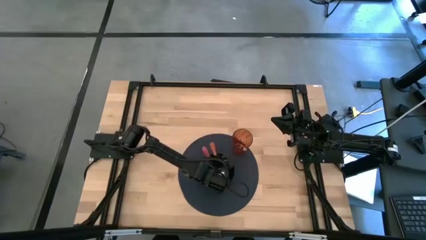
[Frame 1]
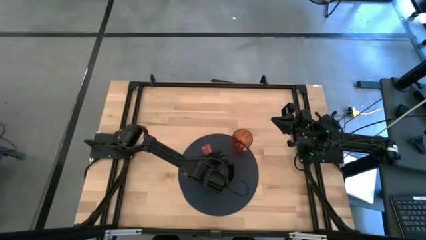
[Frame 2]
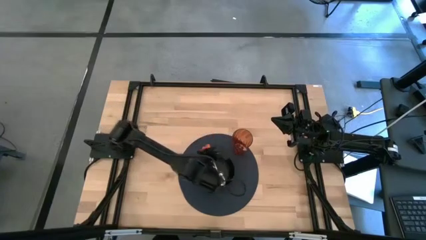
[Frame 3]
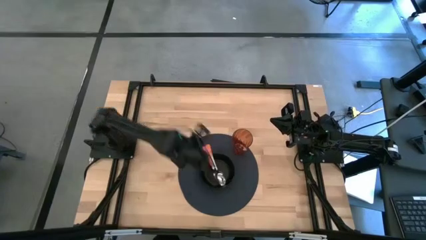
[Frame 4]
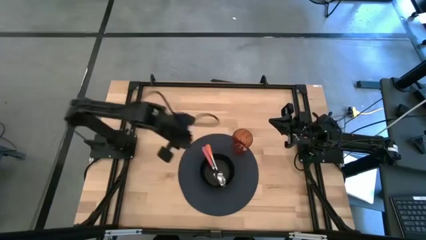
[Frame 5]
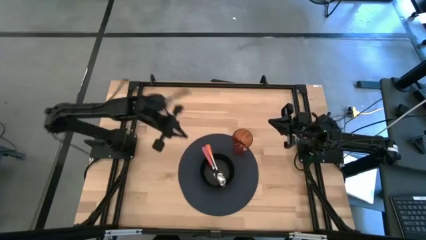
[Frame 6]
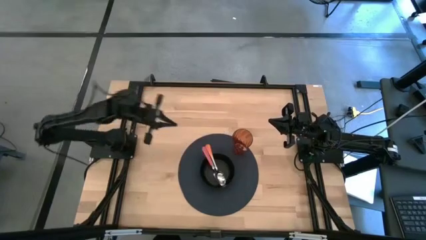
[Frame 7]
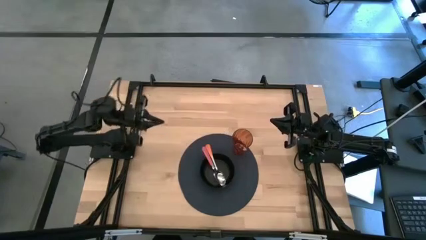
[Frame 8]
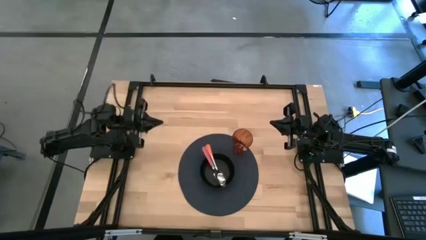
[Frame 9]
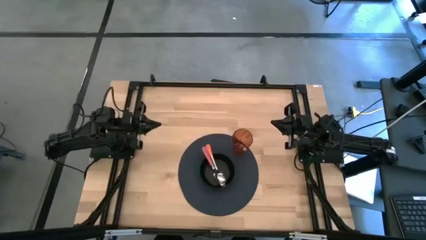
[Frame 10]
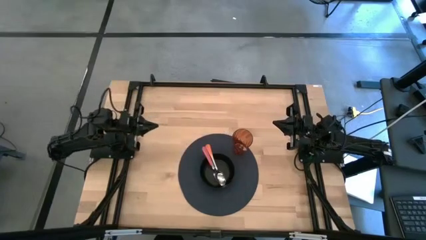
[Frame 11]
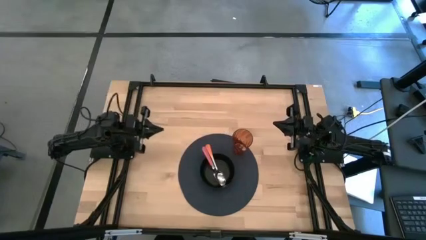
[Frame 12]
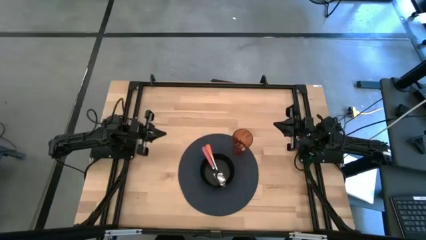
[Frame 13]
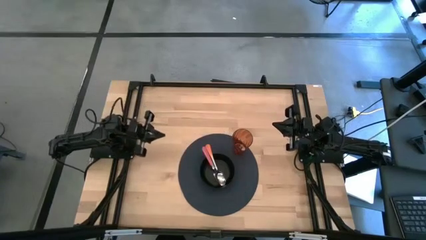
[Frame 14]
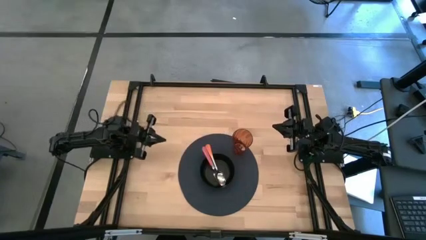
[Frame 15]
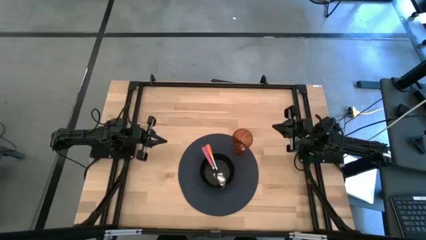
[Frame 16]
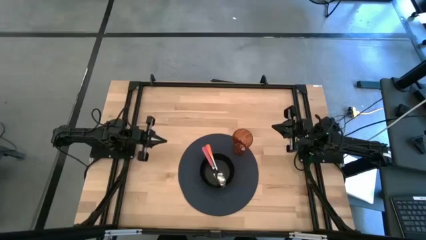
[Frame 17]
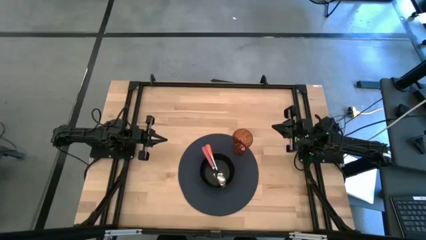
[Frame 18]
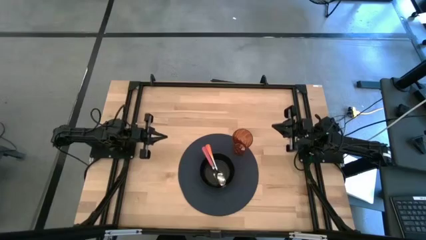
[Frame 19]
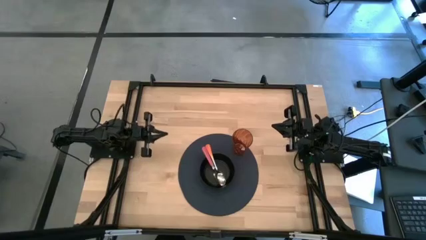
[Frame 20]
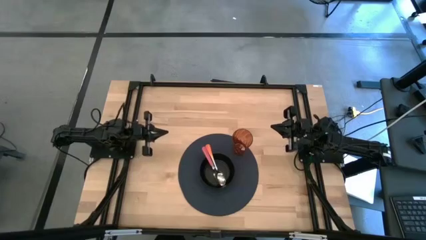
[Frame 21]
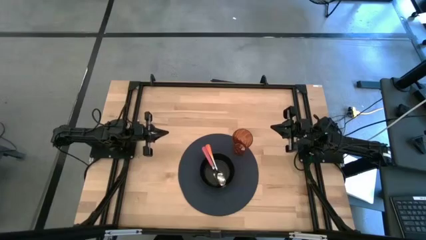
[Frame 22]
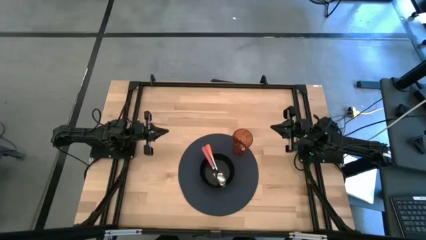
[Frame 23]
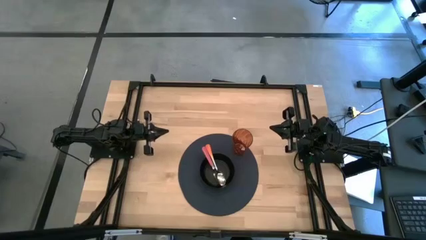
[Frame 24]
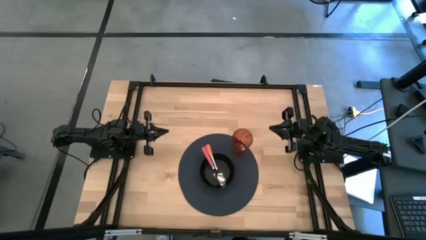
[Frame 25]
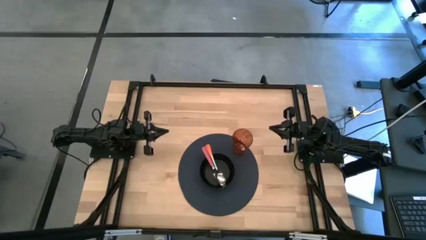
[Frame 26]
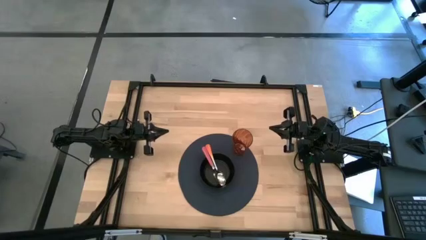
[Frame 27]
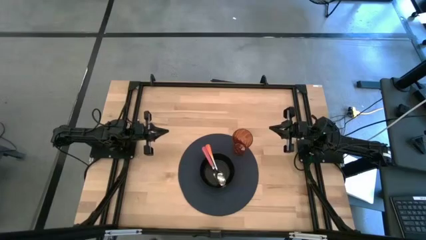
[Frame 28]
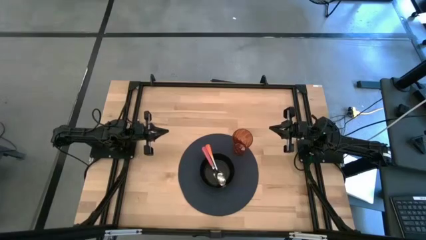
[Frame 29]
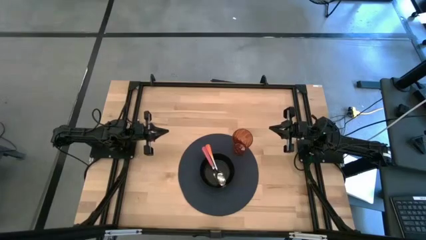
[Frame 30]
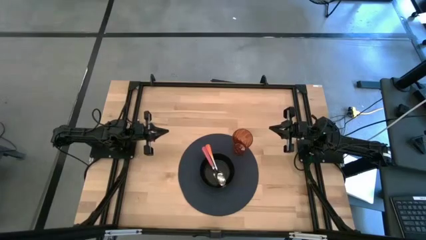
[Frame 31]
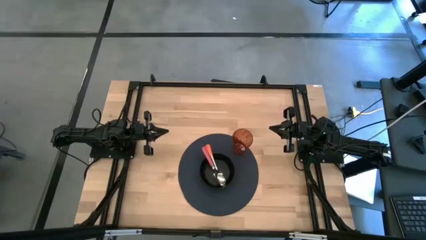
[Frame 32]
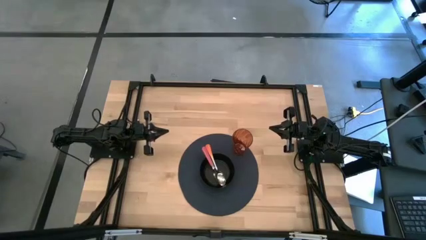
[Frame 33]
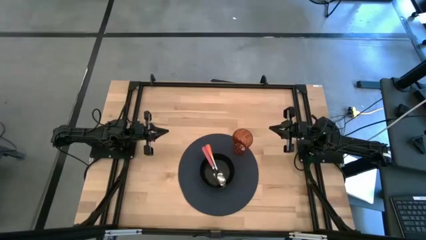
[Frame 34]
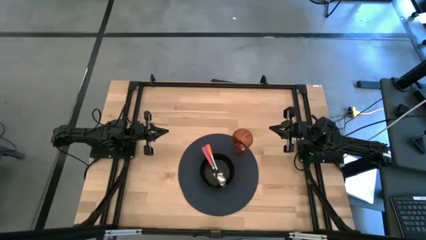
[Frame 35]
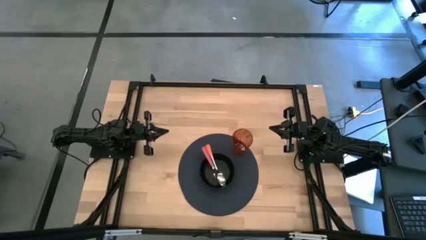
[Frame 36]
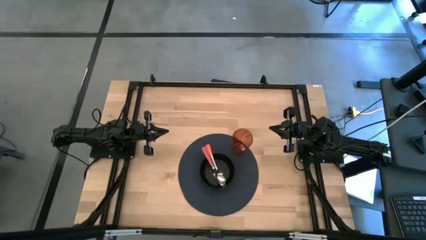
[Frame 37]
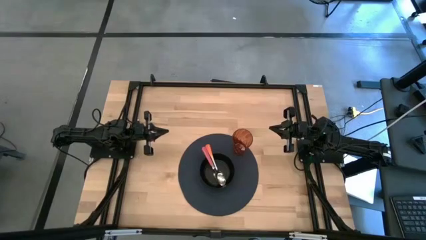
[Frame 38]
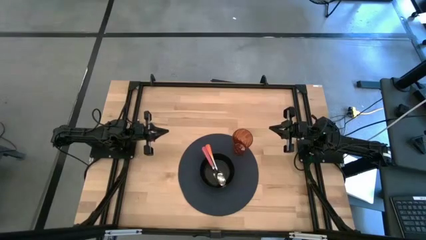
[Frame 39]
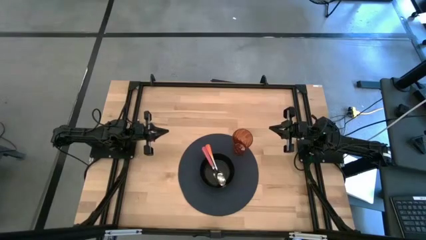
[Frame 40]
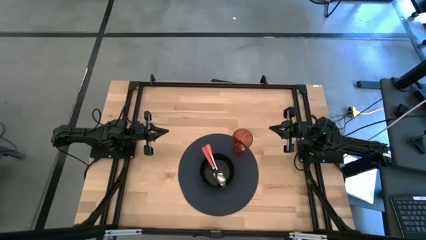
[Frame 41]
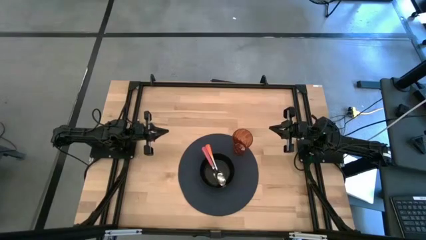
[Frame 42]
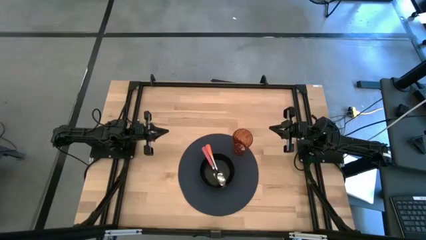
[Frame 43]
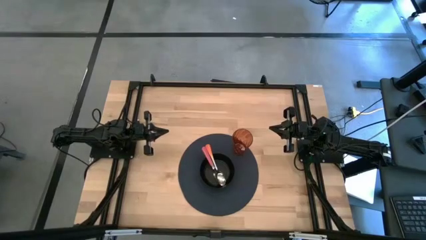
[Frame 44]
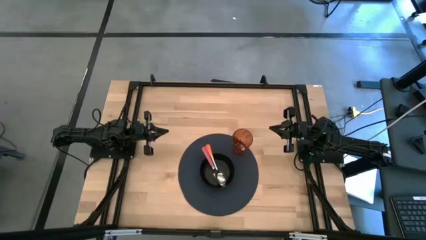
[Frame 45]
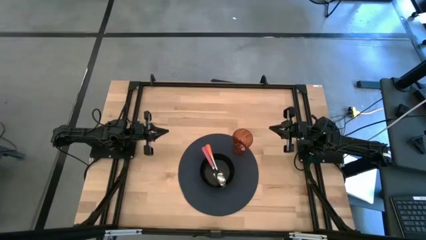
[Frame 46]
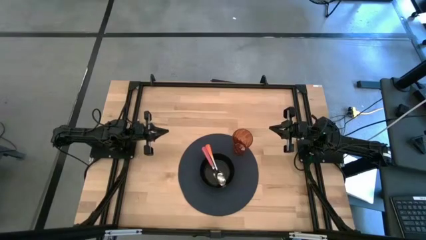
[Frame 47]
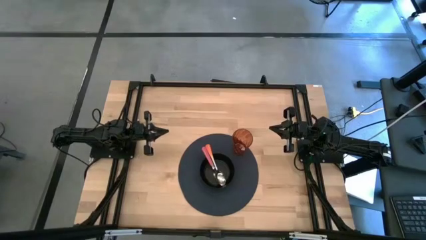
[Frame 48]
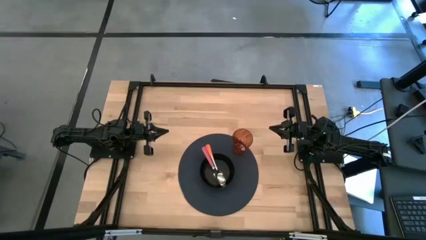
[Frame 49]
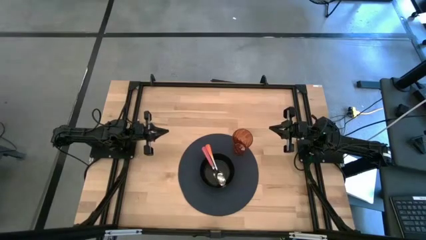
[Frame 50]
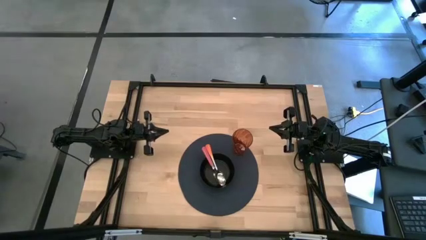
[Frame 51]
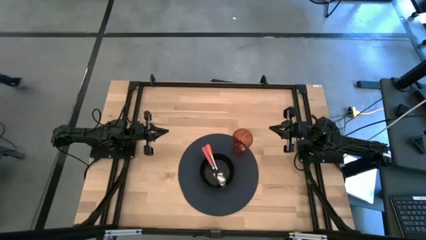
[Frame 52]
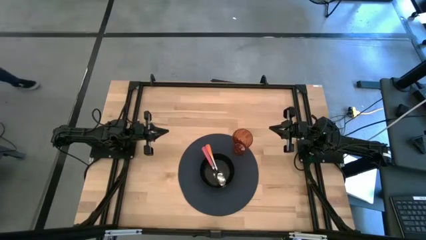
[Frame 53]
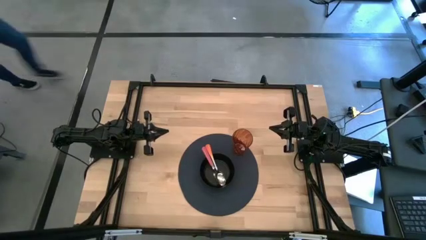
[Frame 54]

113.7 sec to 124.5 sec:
Task: Pick & Place Utensil
Return to Home Position
